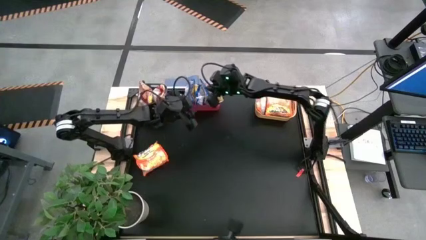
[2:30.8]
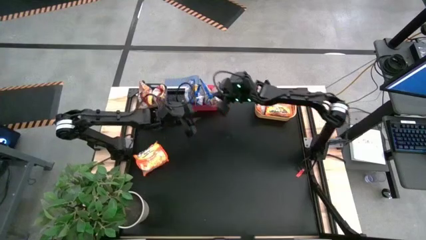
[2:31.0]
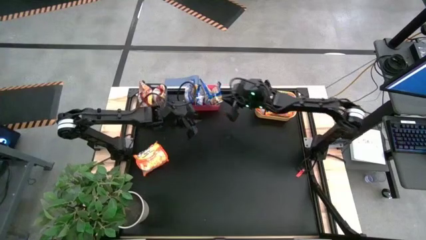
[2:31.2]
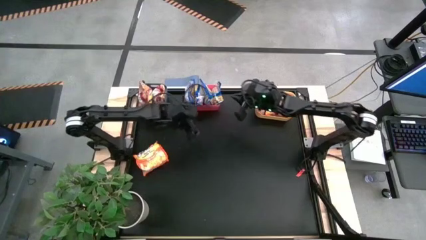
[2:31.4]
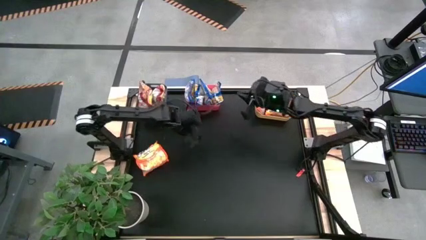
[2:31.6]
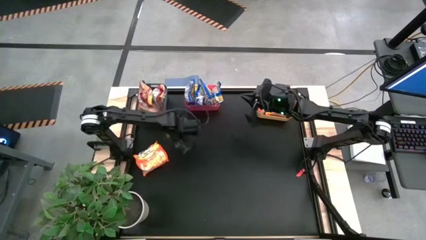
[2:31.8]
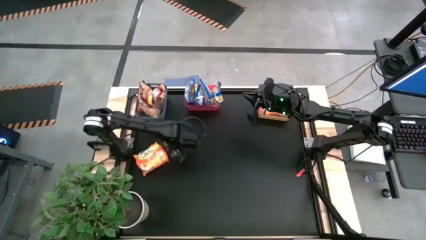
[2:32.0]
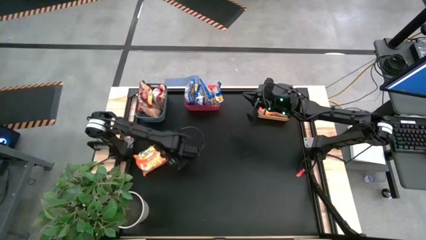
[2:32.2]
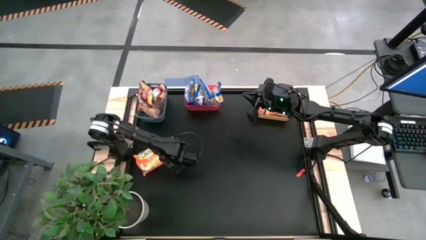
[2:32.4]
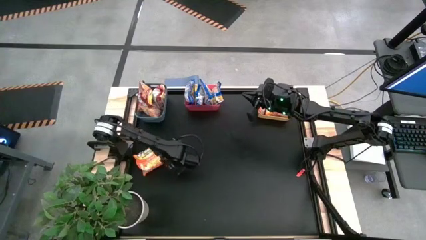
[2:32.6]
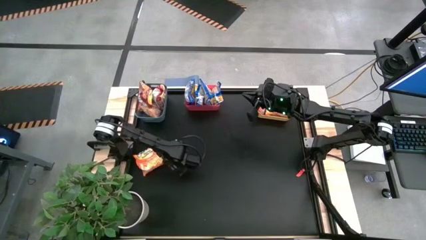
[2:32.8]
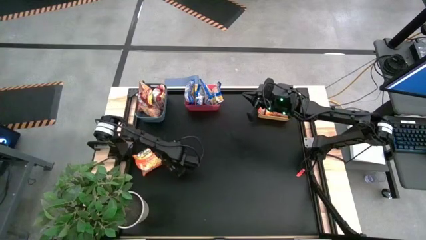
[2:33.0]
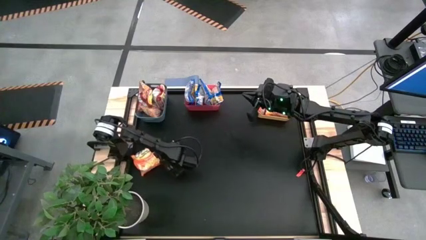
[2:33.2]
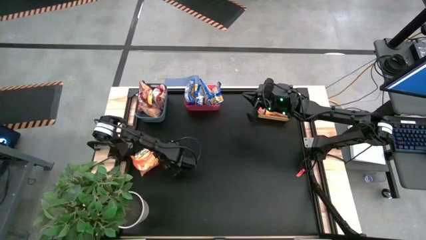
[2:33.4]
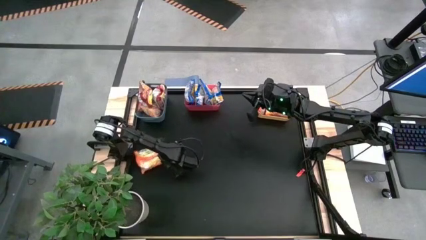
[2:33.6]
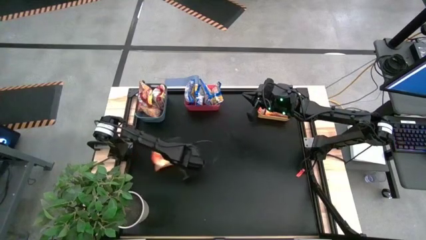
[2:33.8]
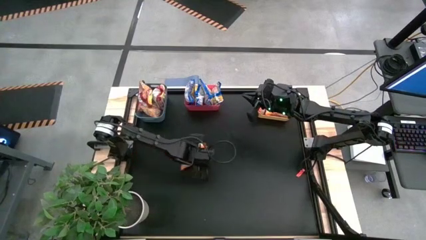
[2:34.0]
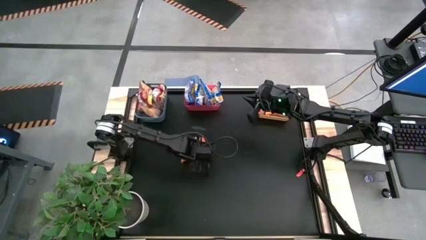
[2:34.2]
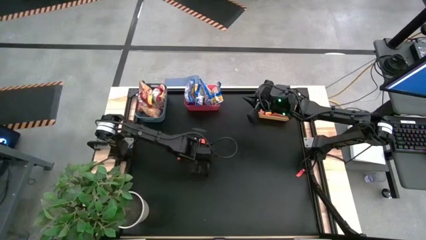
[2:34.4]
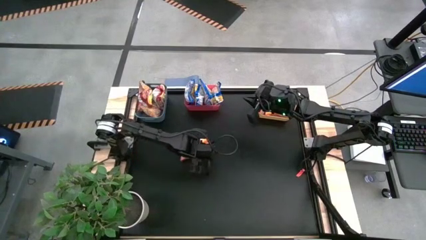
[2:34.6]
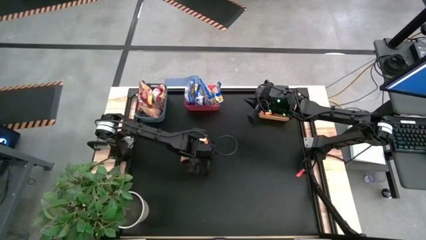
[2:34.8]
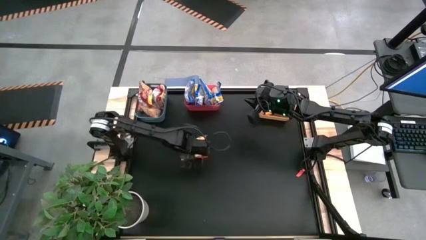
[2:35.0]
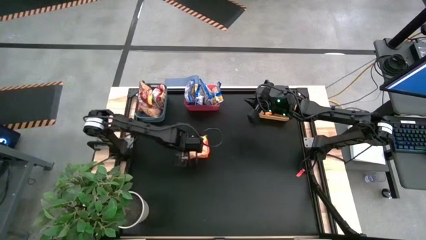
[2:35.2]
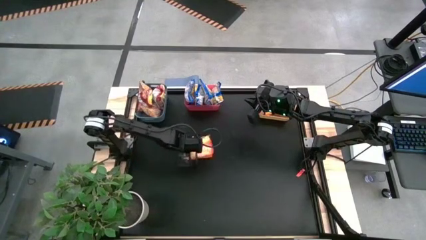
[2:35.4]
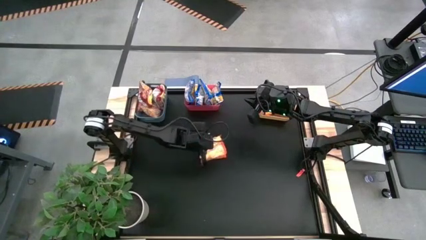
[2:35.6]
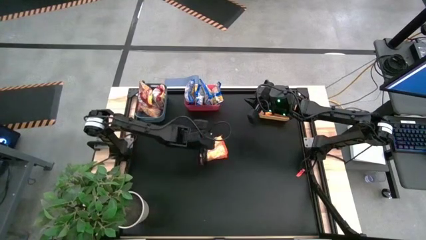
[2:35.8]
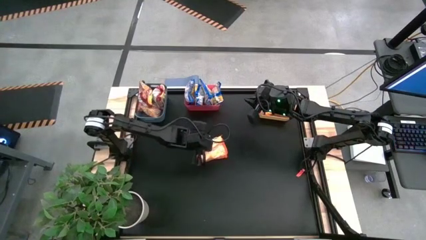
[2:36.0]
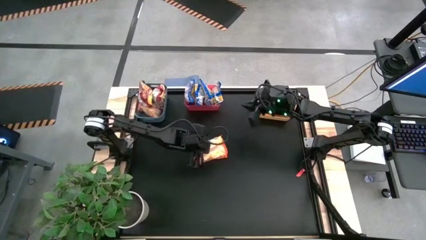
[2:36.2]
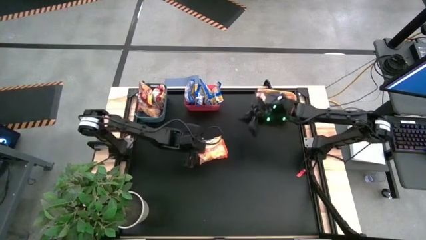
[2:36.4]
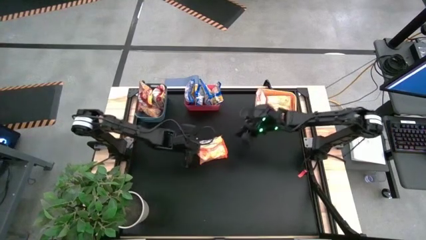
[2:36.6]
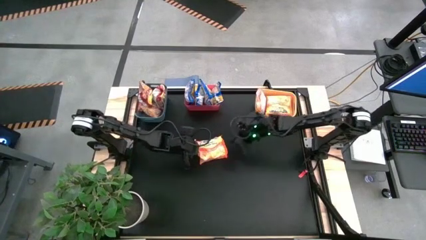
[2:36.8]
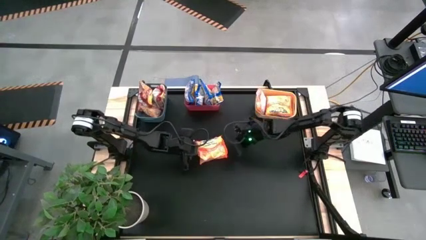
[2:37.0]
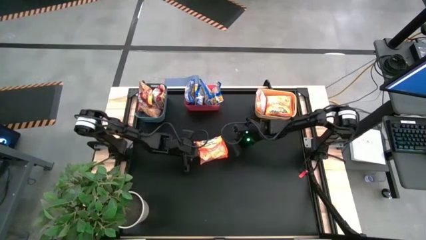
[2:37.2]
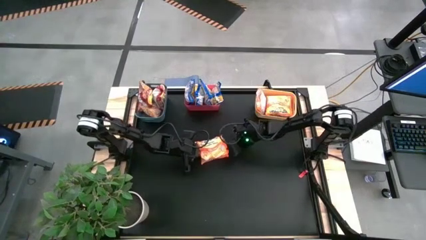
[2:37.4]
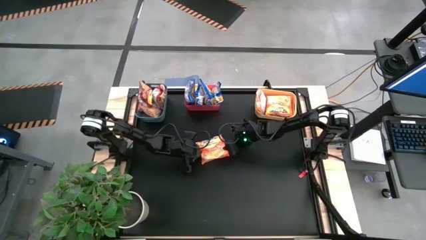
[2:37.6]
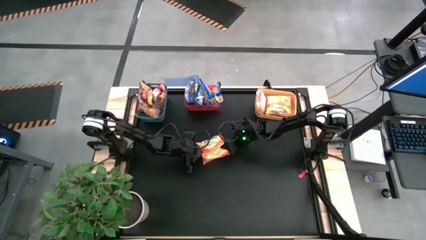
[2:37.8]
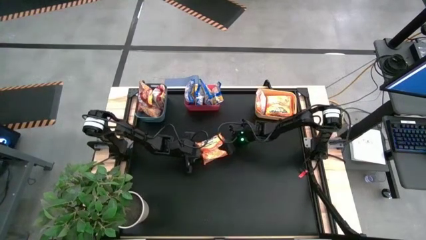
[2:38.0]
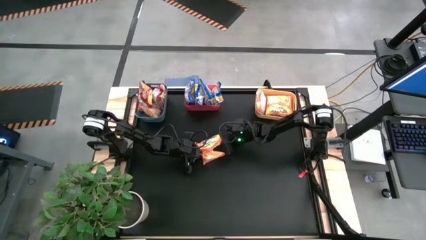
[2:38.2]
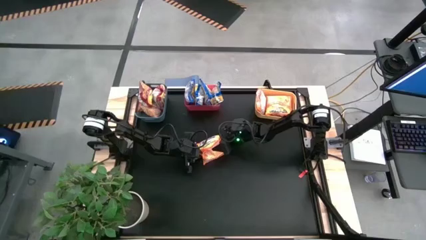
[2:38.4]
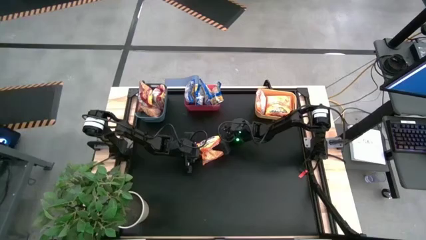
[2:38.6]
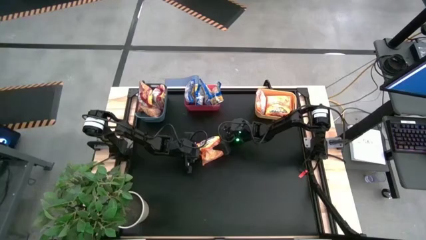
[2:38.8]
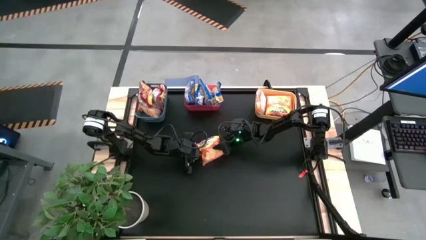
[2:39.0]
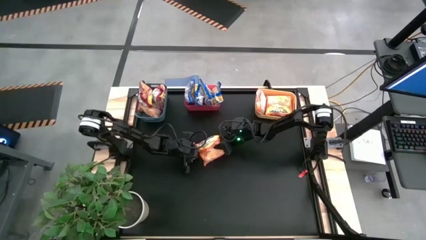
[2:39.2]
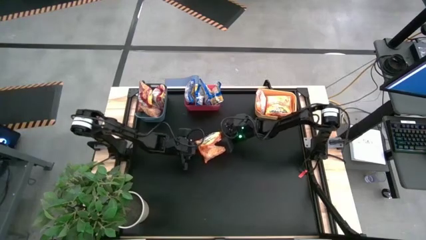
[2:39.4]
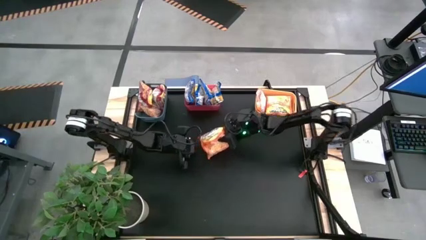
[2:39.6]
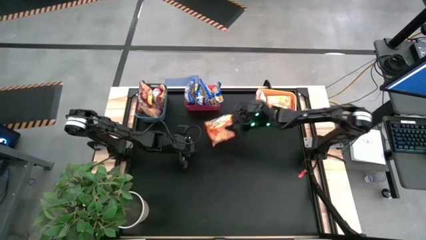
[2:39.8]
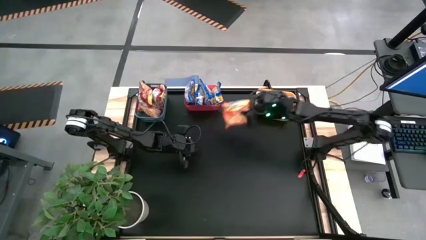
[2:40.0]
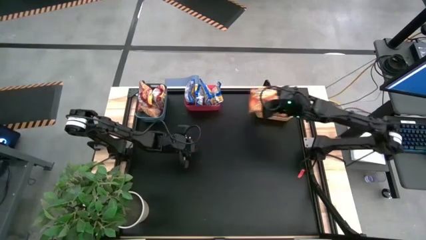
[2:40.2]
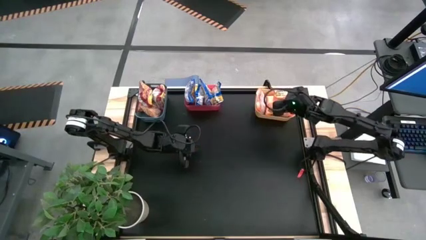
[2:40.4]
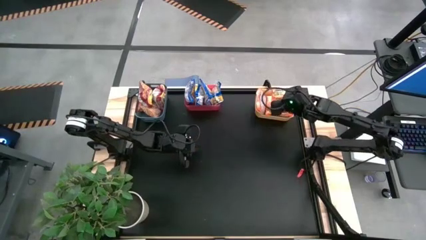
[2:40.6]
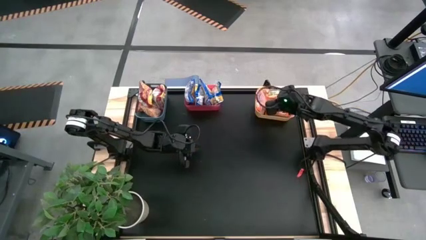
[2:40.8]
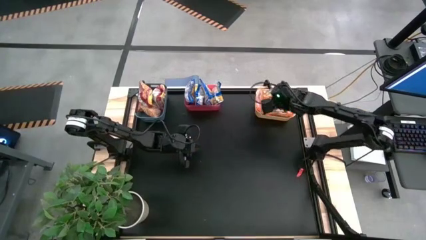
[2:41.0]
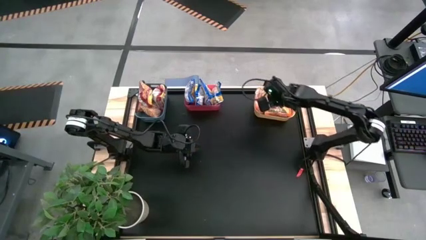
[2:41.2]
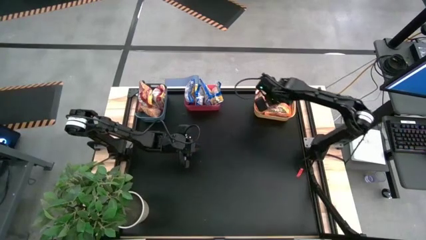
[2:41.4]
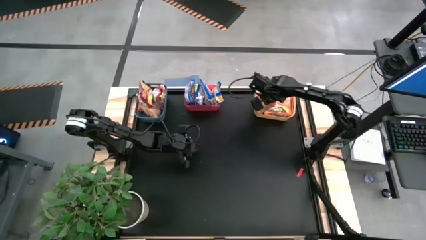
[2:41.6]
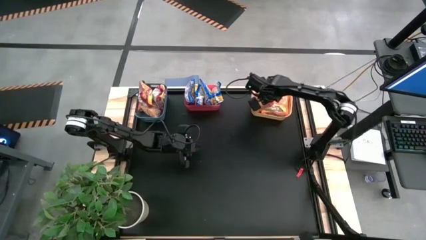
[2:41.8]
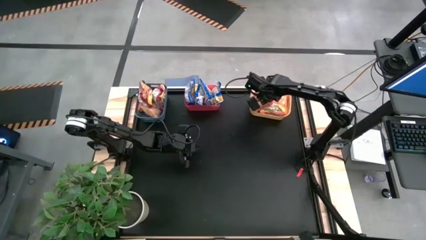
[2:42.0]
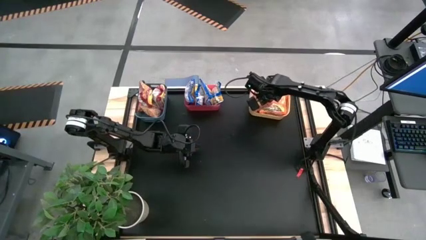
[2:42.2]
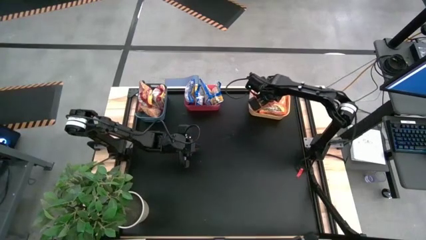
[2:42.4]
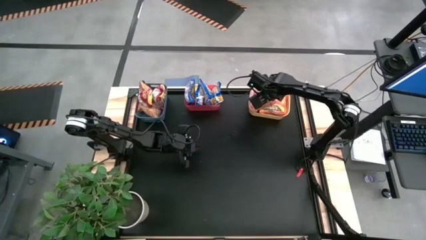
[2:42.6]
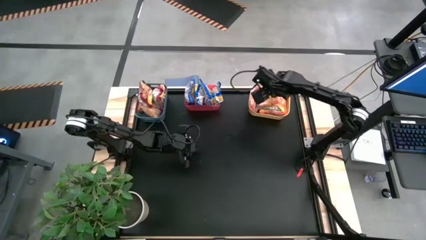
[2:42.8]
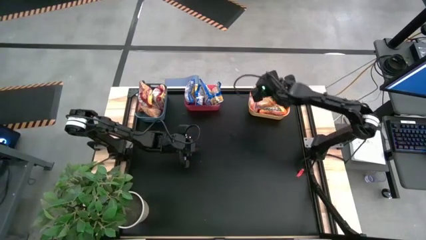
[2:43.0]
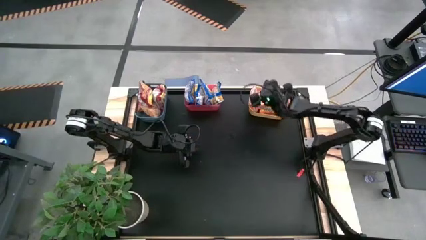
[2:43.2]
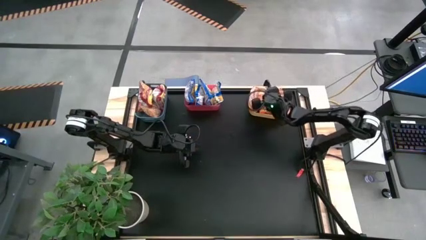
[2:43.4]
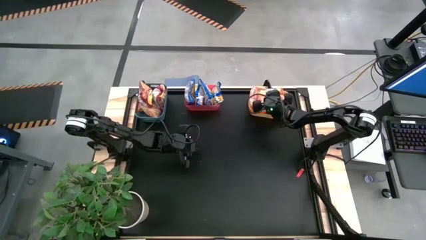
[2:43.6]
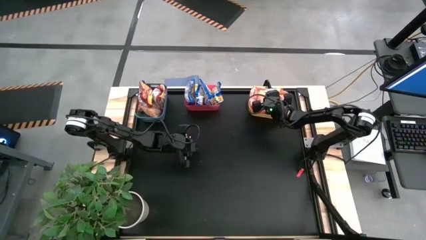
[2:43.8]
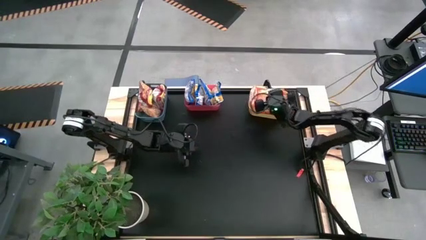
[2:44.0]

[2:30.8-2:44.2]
Task: Sort Maruchan noodles
Put the orange noodle pack into the yellow bin

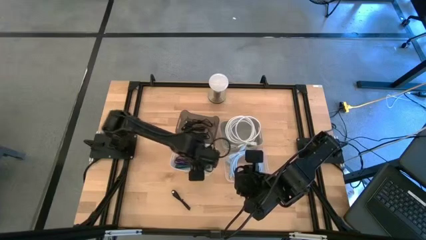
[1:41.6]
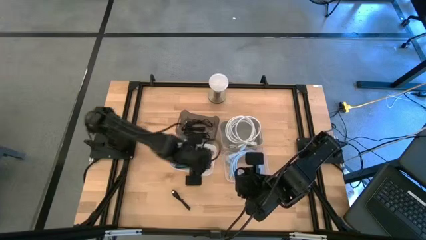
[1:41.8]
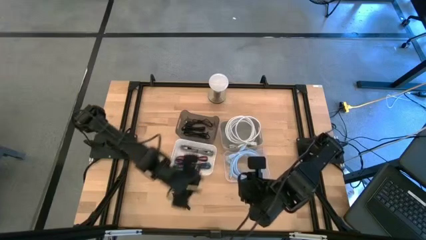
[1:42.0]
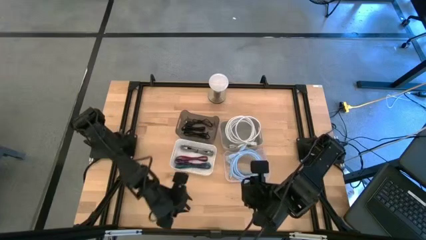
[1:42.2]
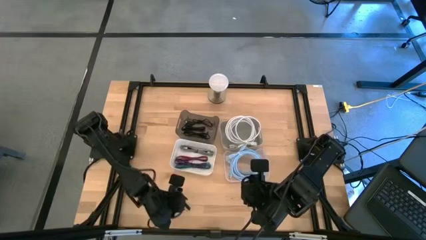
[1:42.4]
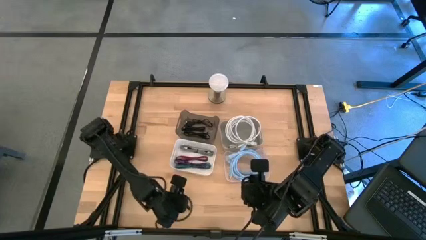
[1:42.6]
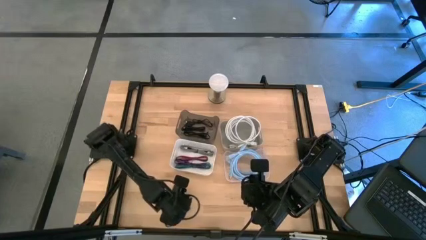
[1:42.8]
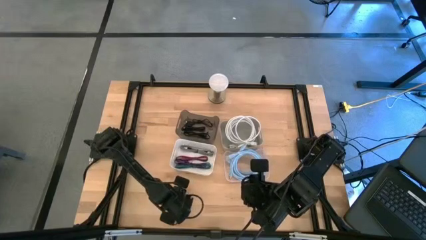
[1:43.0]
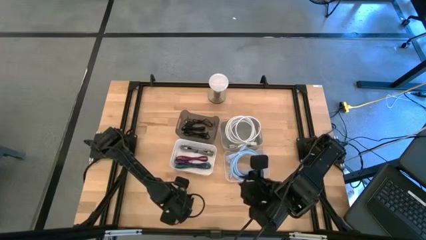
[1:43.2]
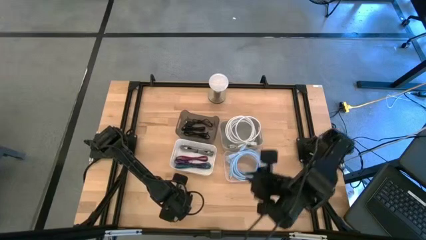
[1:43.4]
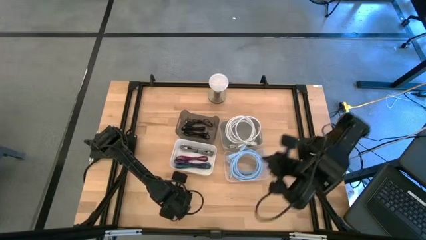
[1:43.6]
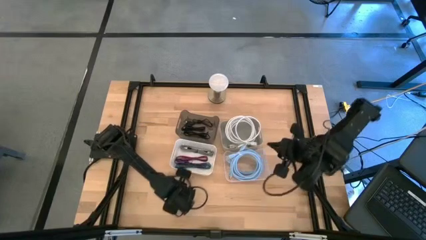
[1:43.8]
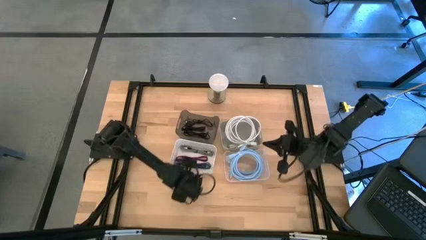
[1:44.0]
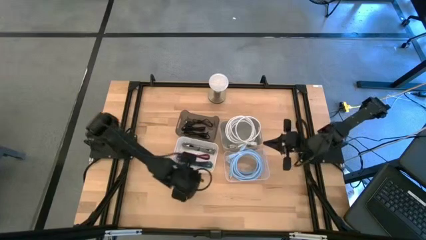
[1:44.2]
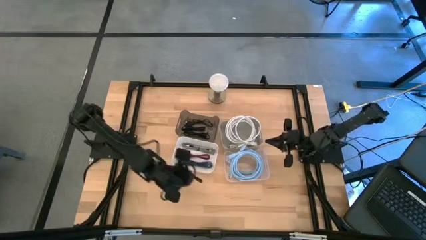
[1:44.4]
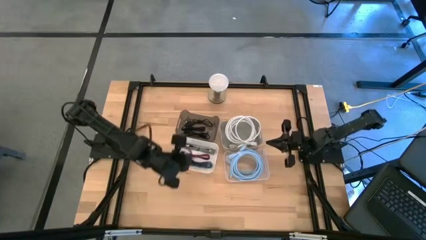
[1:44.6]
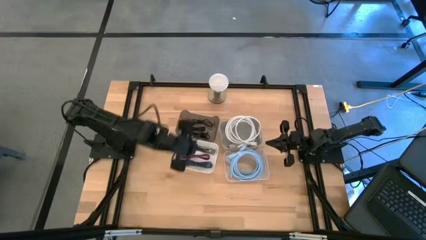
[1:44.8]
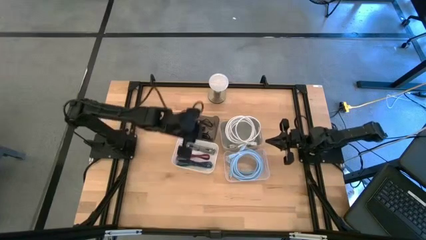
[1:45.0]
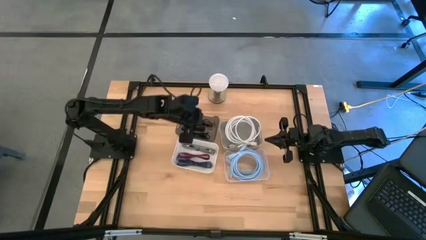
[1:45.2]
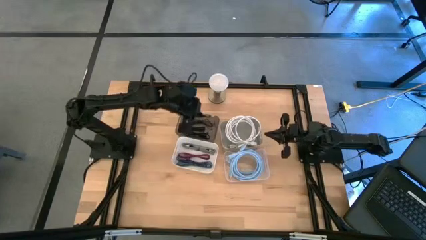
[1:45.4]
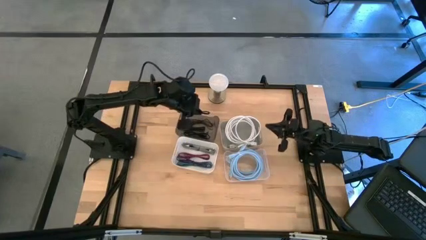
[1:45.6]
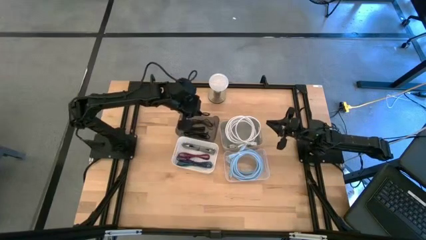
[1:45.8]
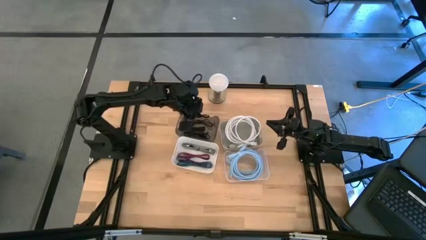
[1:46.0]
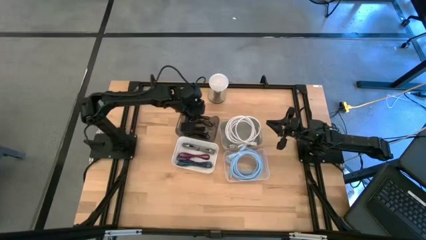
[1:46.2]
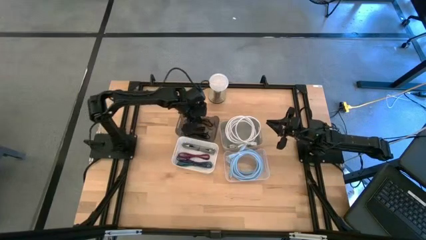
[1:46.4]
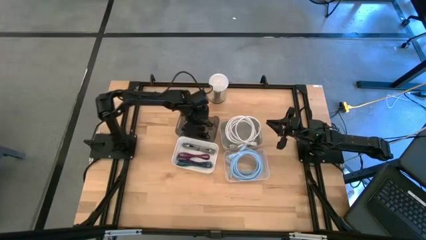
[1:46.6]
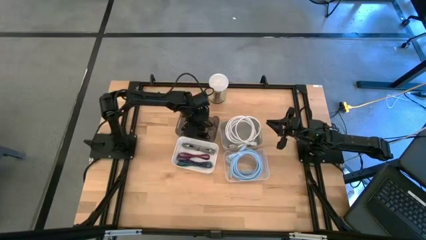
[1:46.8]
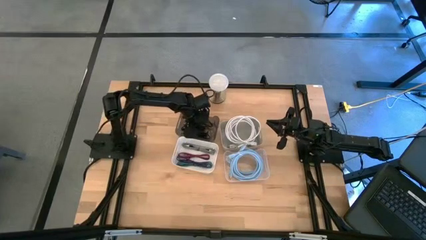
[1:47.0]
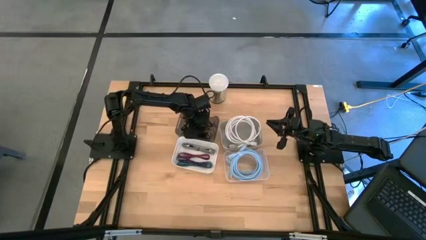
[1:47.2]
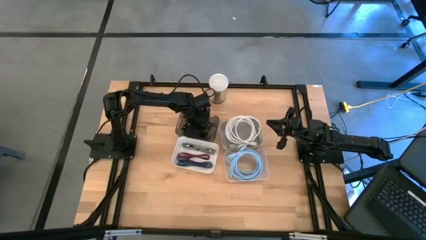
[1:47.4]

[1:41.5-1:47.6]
Task: Pick & Place USB Port
Put the black charger cable into the black bin
